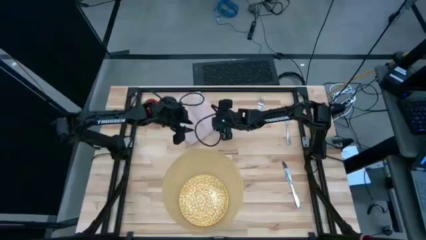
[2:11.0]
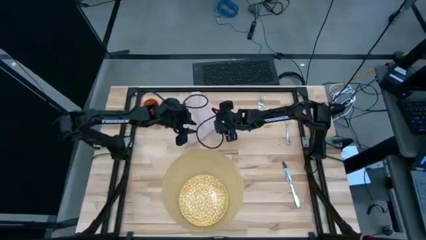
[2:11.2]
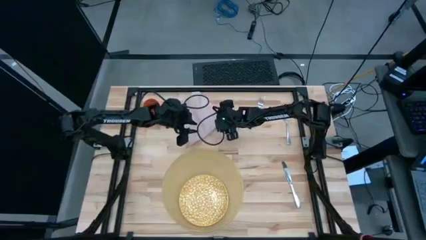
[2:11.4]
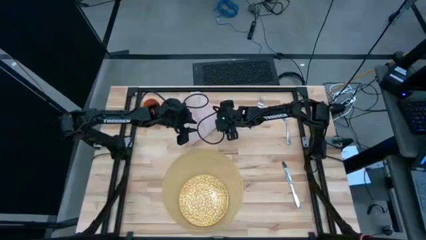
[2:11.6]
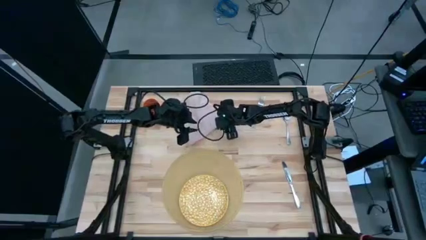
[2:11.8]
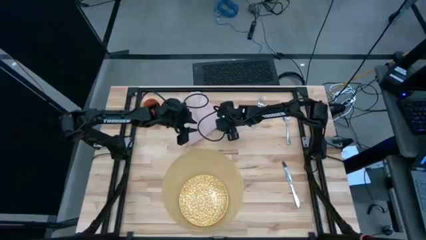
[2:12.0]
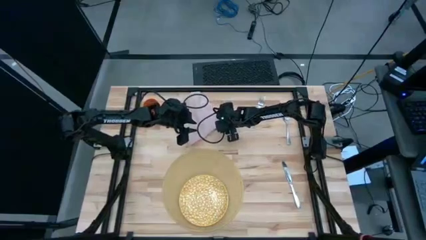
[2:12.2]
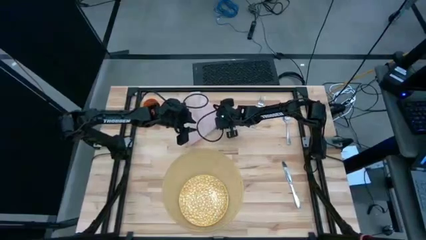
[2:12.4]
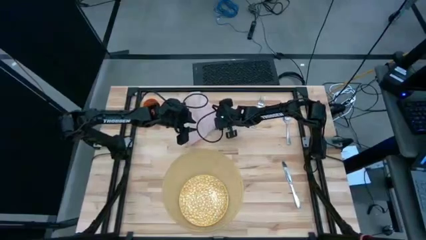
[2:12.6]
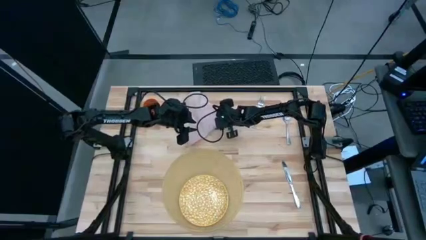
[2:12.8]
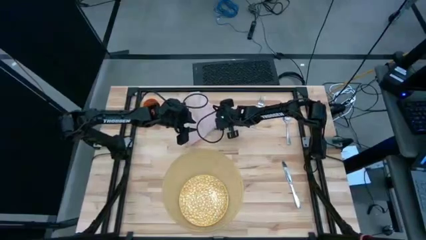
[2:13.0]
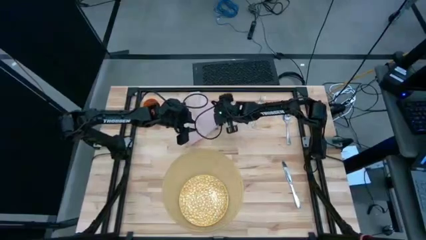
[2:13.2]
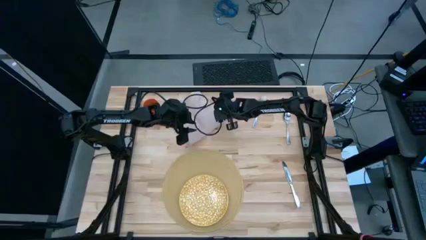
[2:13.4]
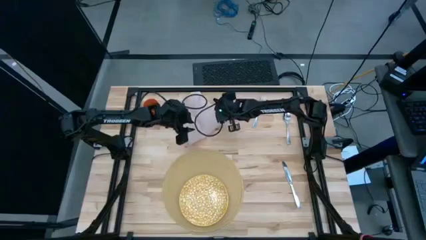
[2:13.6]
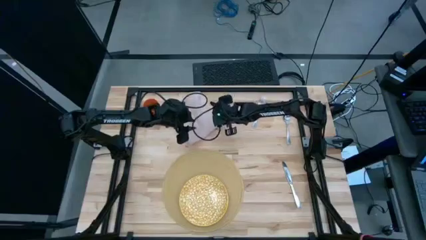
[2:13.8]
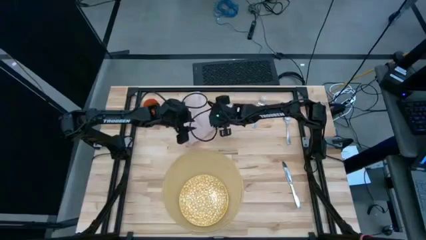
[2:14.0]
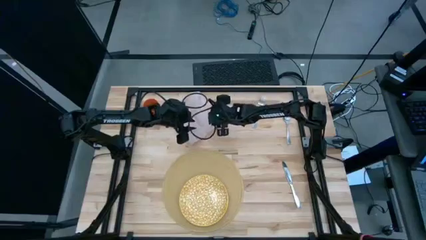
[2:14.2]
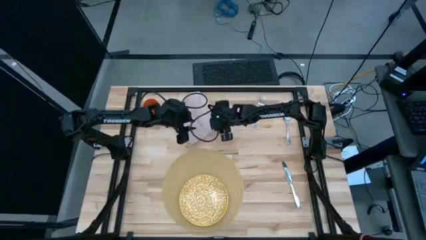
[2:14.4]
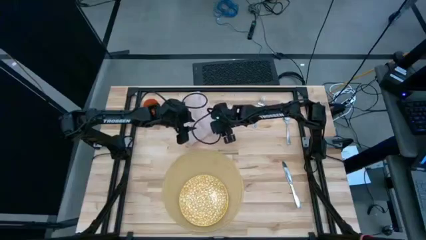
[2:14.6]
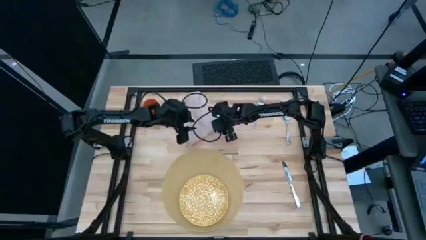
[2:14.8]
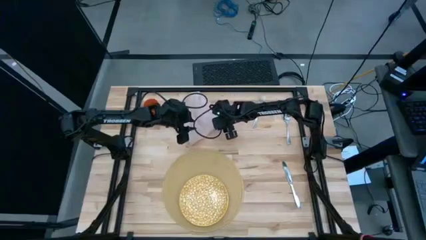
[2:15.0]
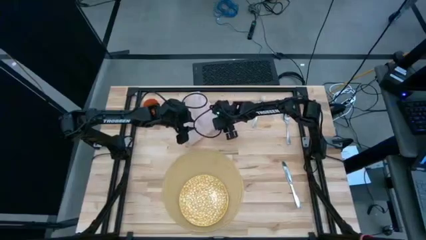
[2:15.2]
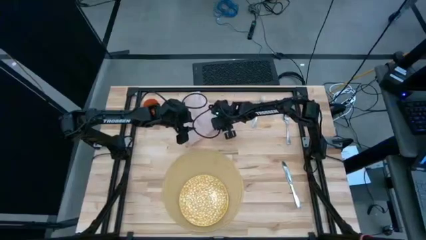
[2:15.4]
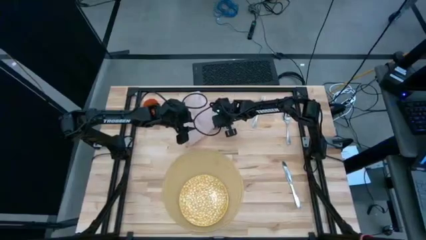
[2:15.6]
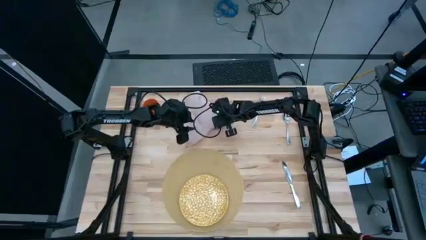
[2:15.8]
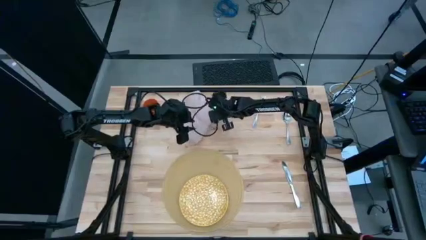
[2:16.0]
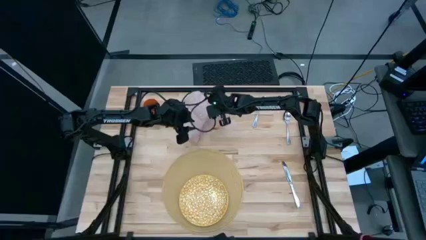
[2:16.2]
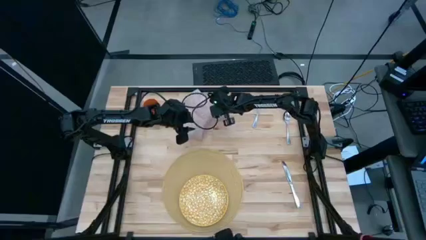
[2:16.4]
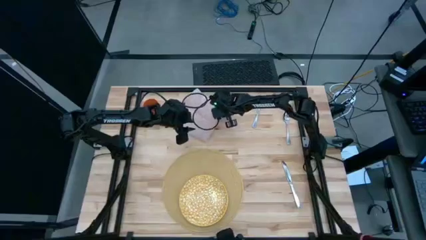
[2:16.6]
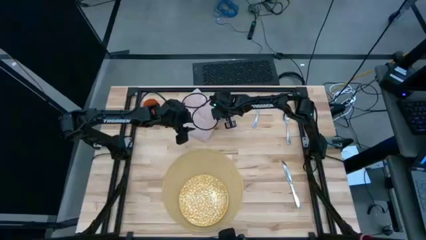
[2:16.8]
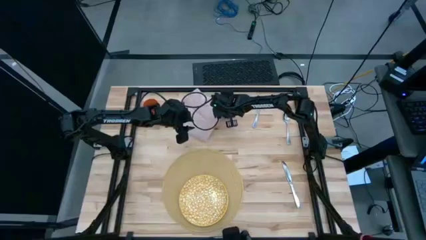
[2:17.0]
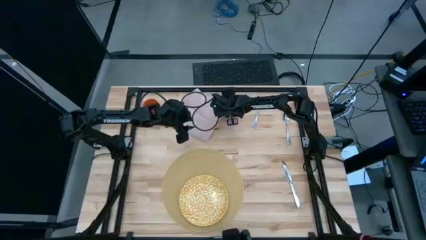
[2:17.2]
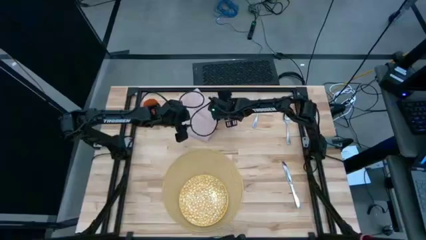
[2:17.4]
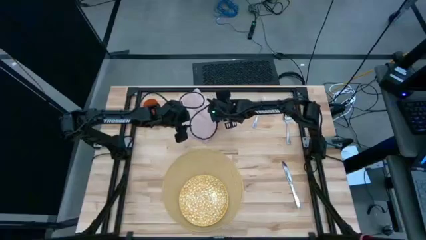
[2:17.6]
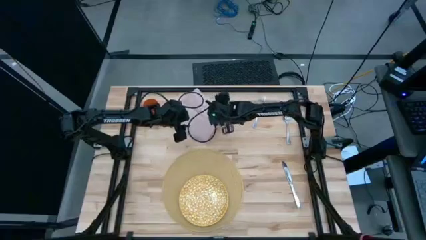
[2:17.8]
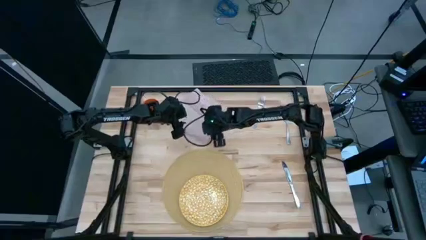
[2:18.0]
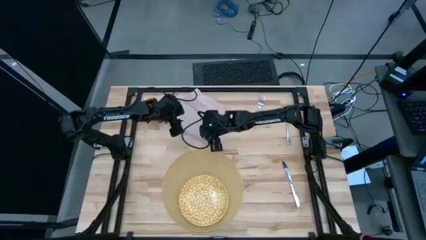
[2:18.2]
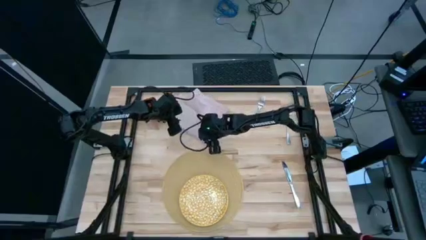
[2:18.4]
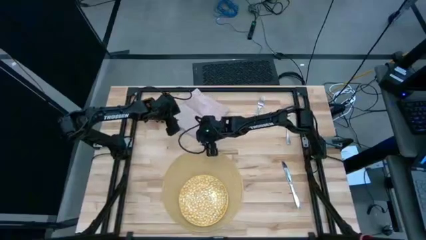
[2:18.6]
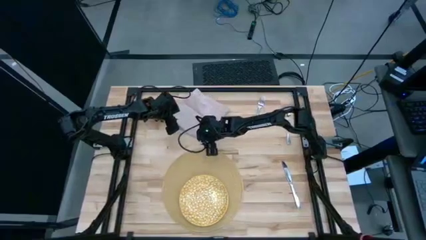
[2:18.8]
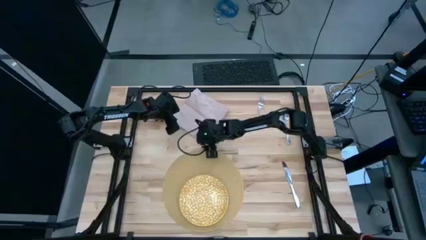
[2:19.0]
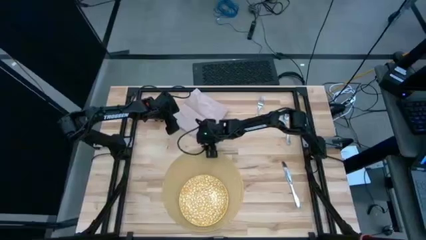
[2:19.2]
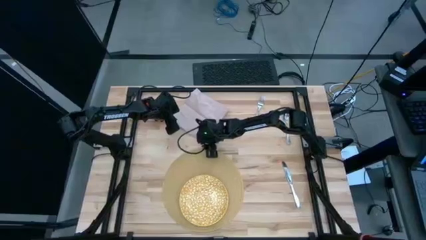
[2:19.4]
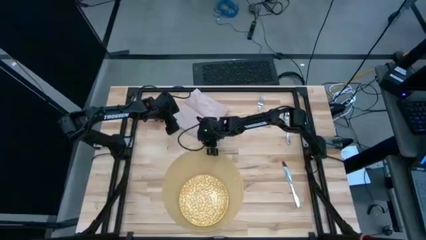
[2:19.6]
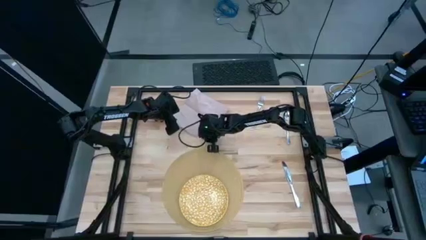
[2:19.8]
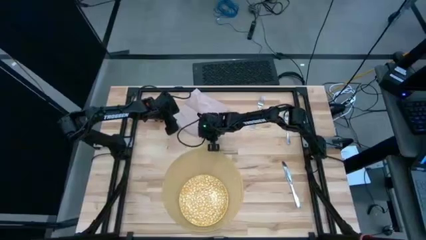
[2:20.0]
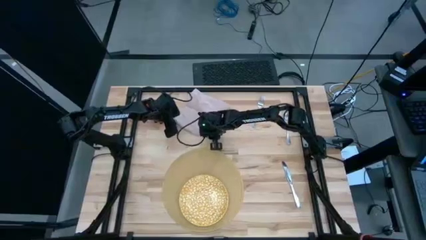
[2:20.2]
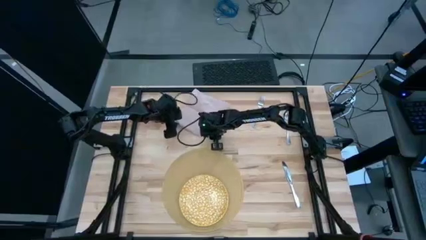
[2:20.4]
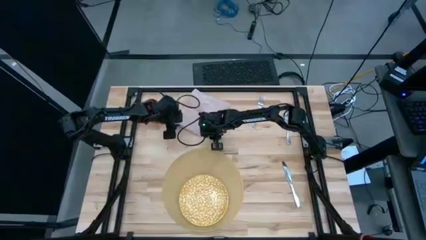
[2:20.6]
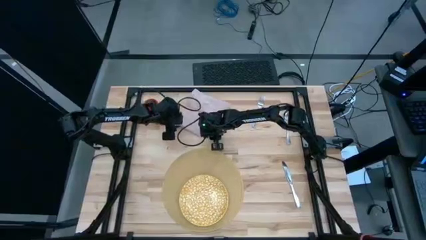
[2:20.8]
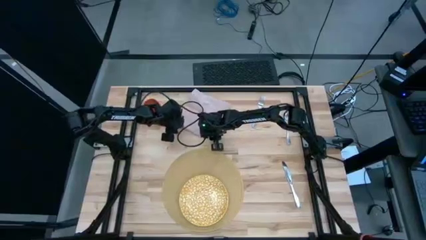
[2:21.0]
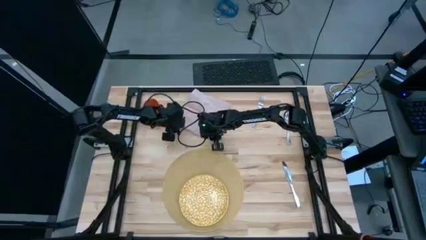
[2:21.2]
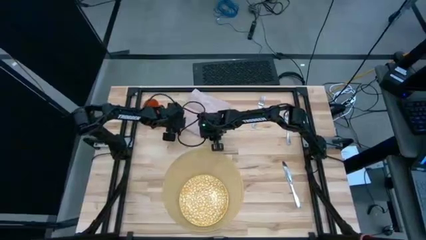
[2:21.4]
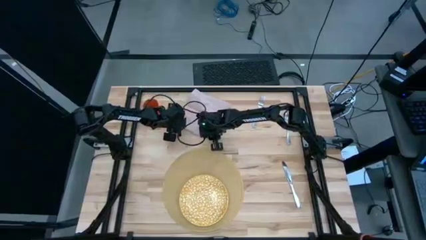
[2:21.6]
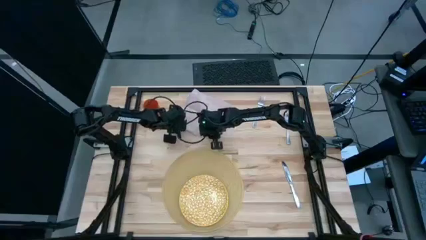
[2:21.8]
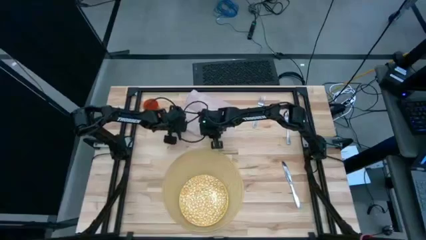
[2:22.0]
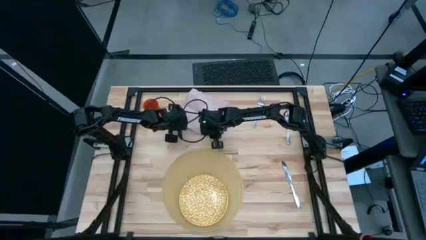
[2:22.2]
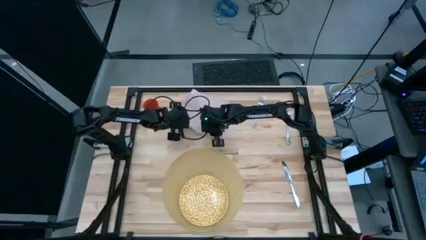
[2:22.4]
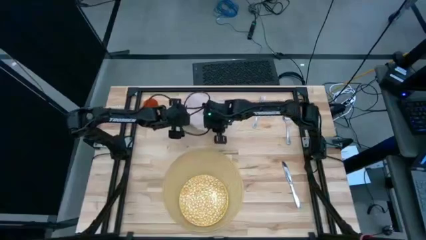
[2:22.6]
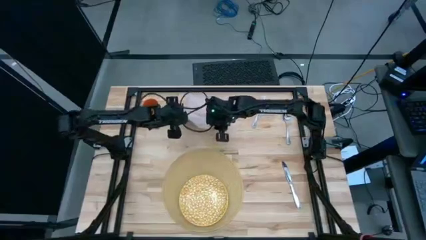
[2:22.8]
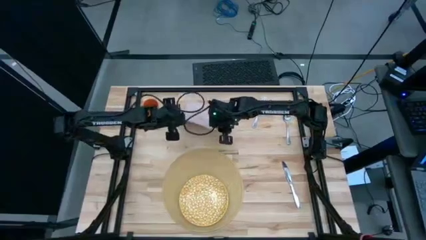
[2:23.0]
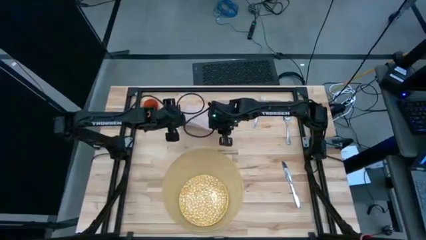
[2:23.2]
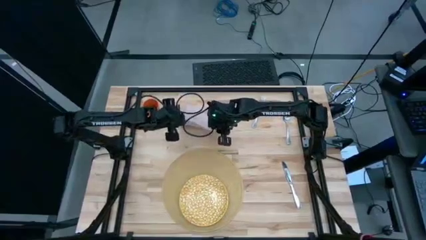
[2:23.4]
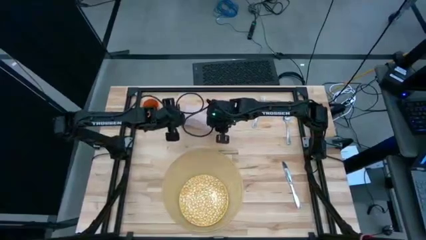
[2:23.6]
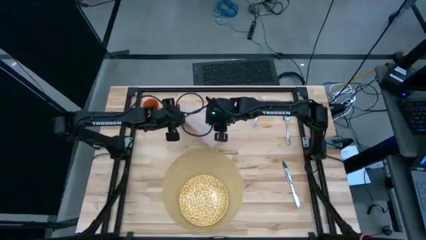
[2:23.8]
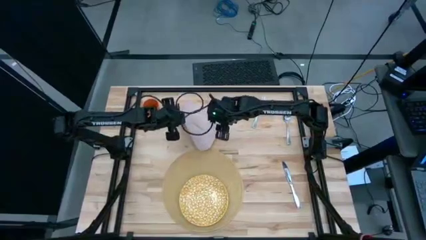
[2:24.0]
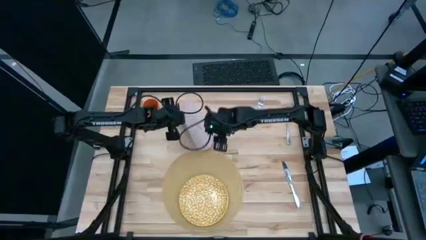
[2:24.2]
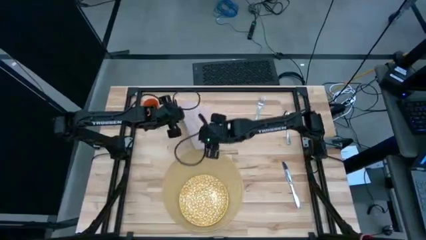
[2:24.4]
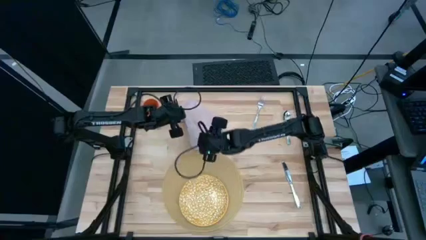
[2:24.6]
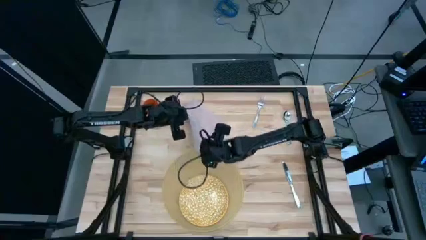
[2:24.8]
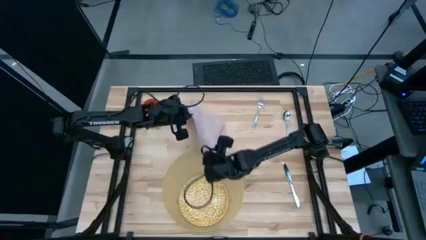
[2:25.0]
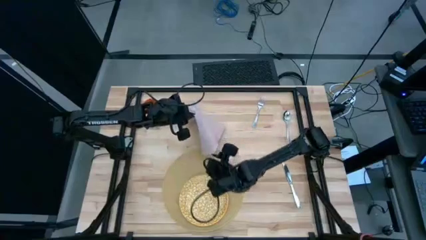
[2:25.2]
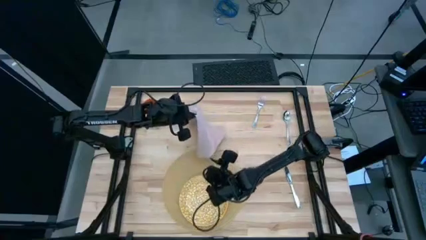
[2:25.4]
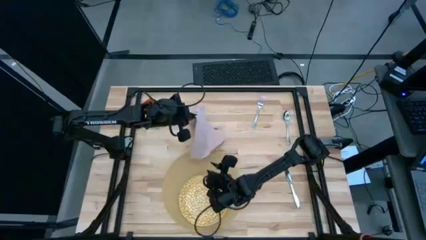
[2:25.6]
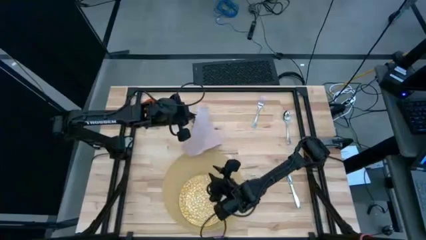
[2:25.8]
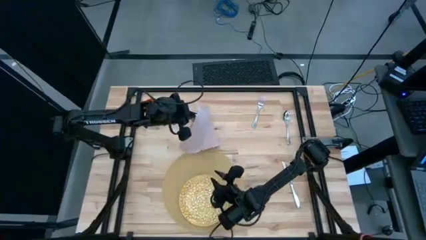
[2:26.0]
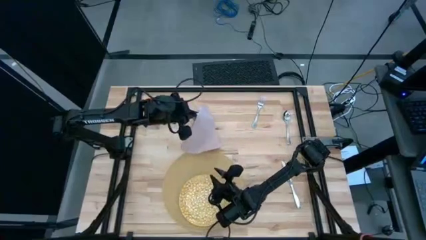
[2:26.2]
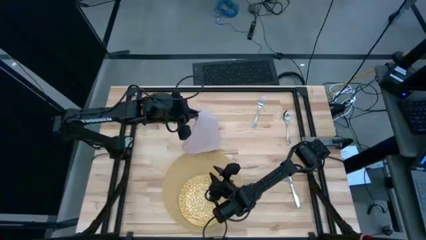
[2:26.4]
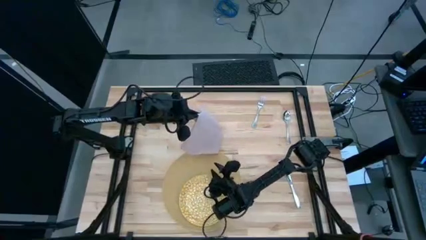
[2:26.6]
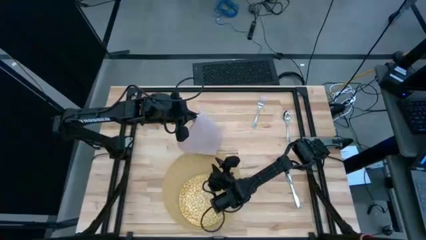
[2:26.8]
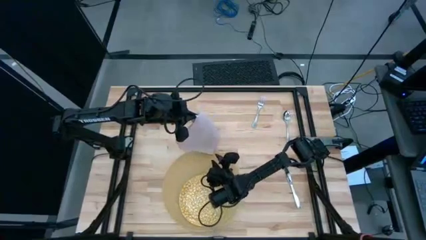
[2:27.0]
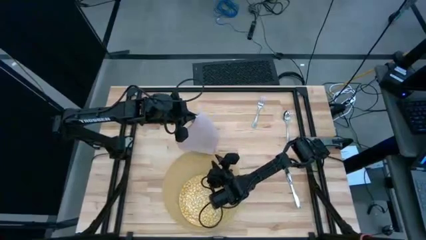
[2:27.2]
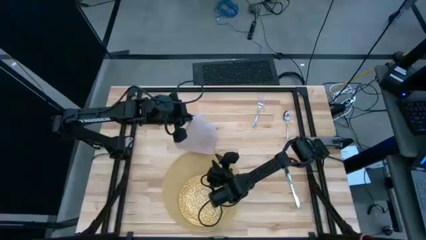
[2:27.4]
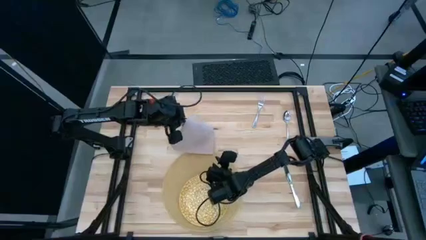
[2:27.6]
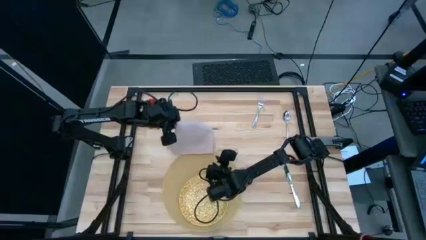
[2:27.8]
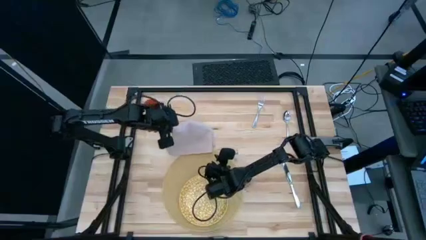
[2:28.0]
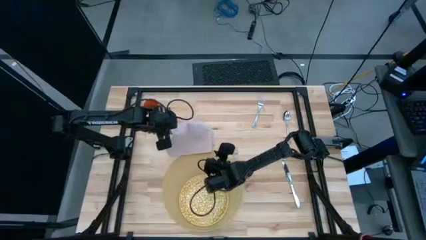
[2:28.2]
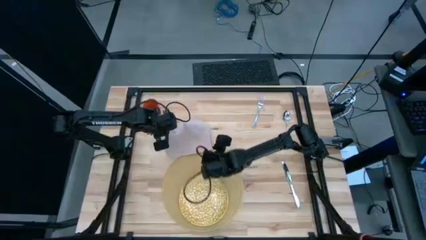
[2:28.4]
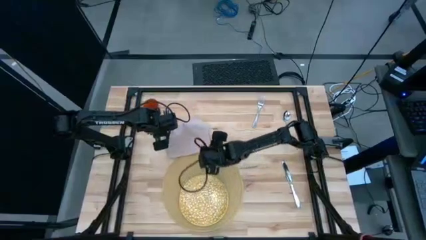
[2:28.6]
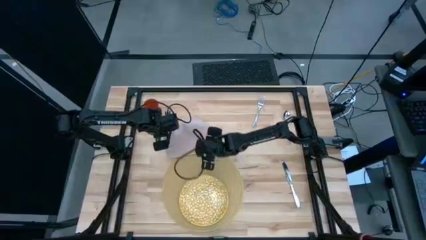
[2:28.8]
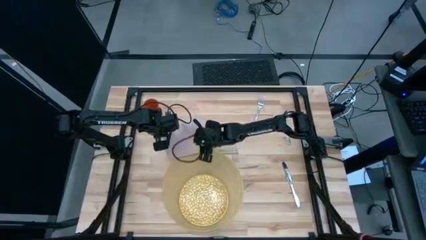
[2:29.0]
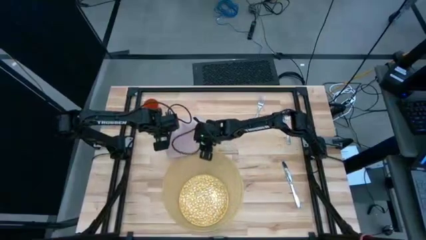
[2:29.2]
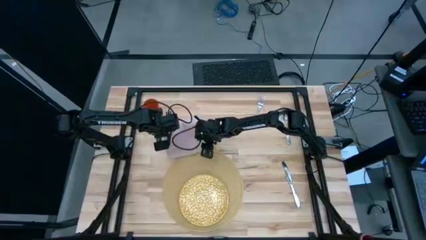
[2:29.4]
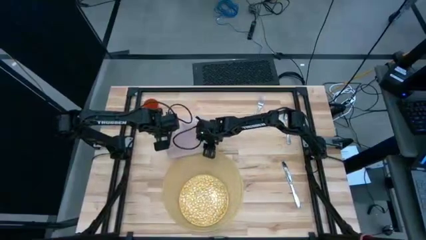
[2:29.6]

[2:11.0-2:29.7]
Task: Set table place
Fold the light orange napkin on the table
